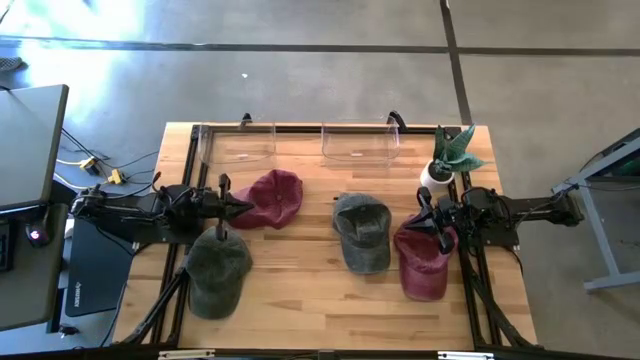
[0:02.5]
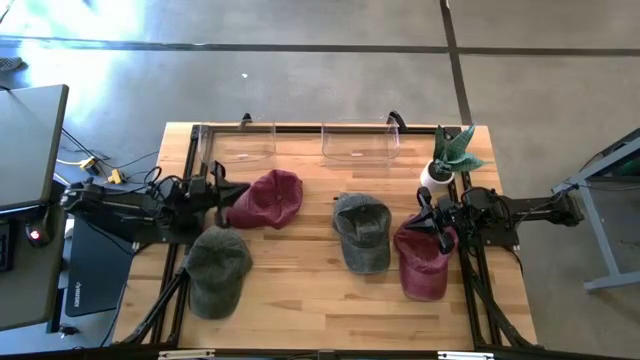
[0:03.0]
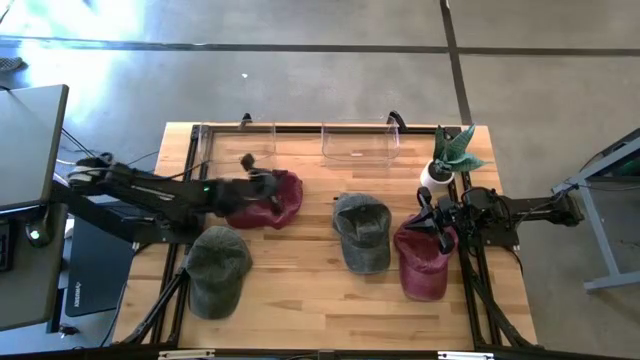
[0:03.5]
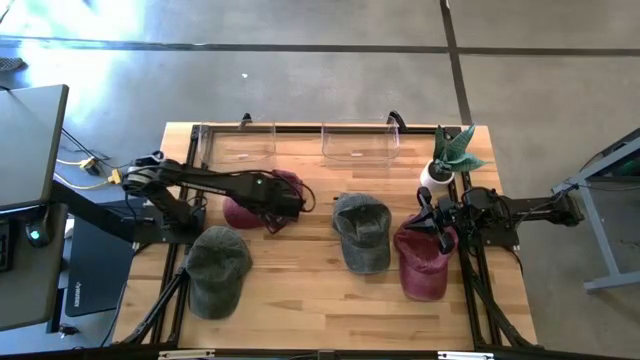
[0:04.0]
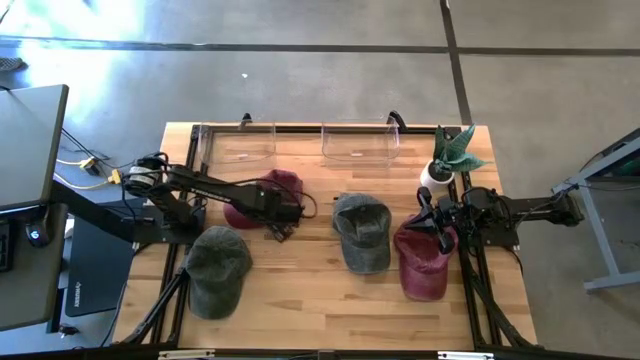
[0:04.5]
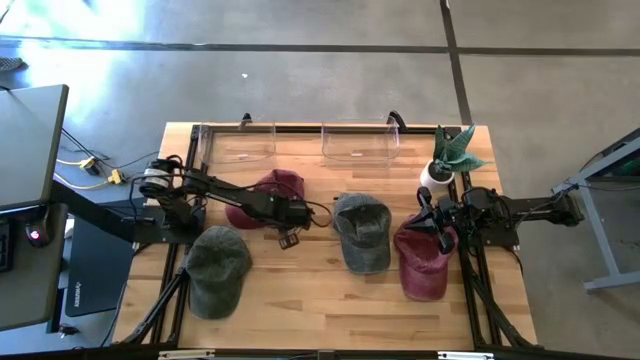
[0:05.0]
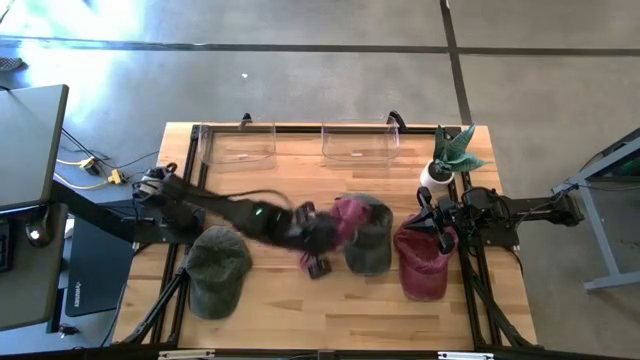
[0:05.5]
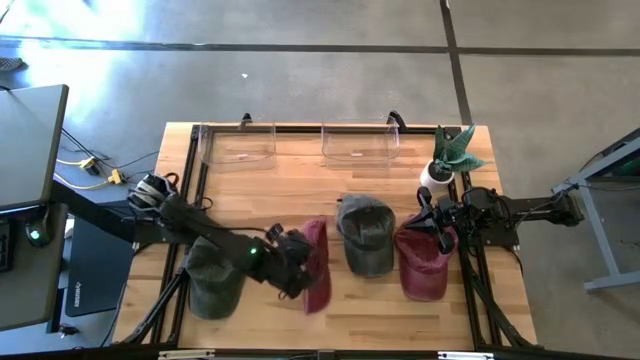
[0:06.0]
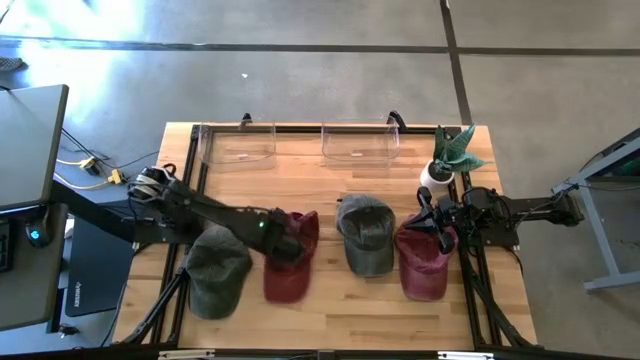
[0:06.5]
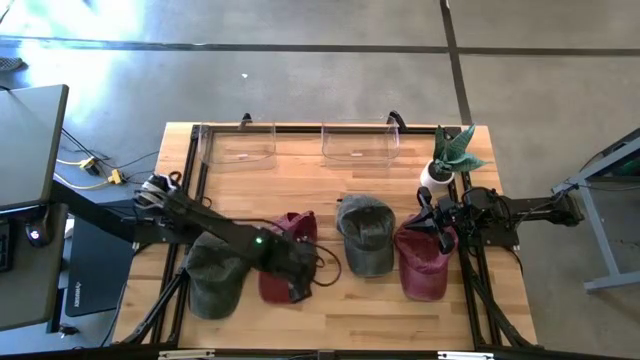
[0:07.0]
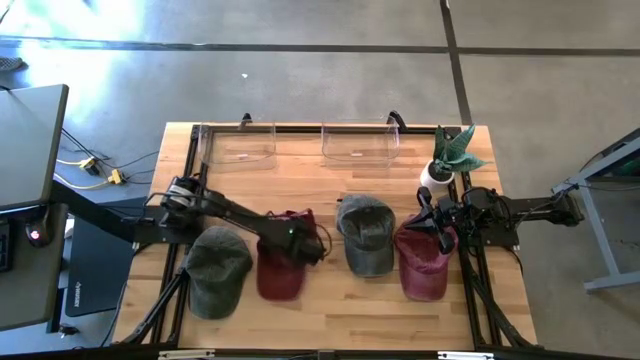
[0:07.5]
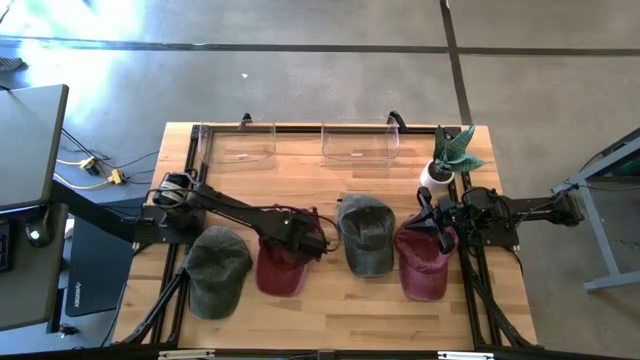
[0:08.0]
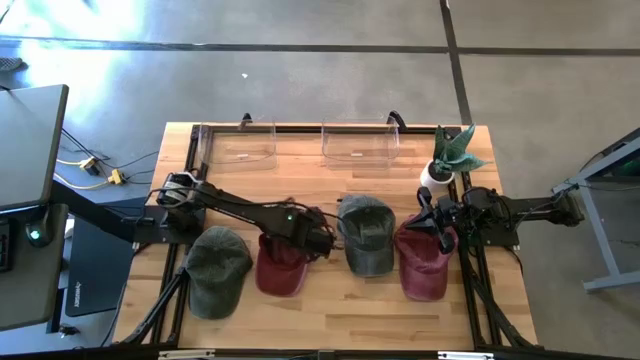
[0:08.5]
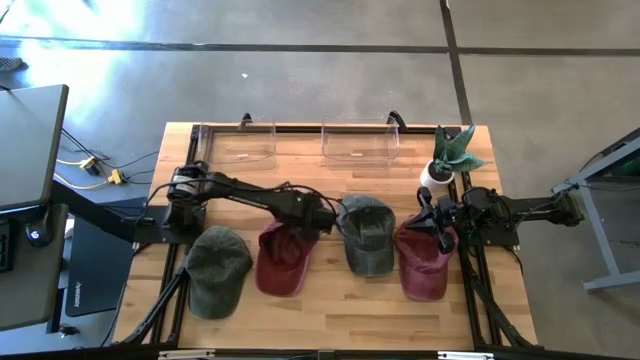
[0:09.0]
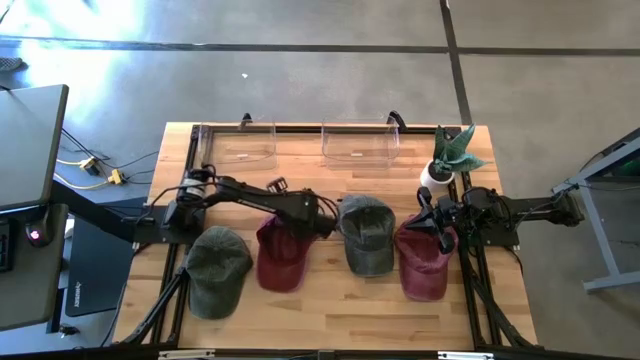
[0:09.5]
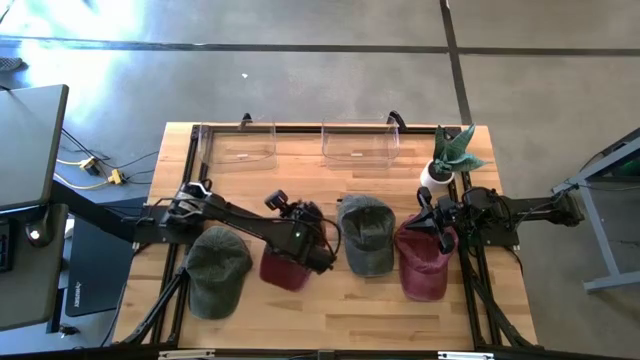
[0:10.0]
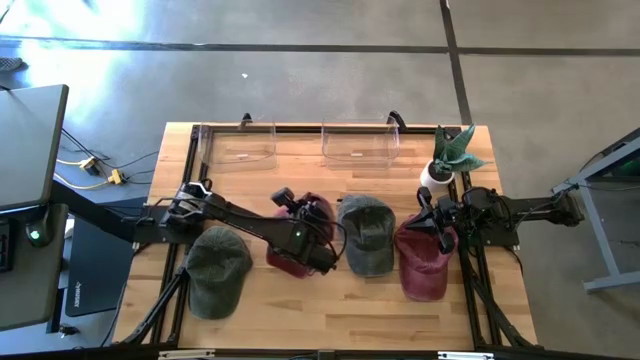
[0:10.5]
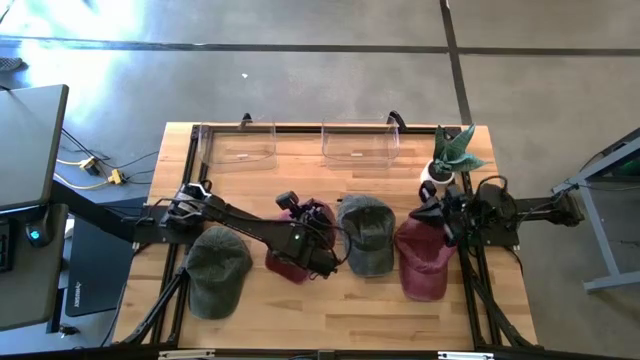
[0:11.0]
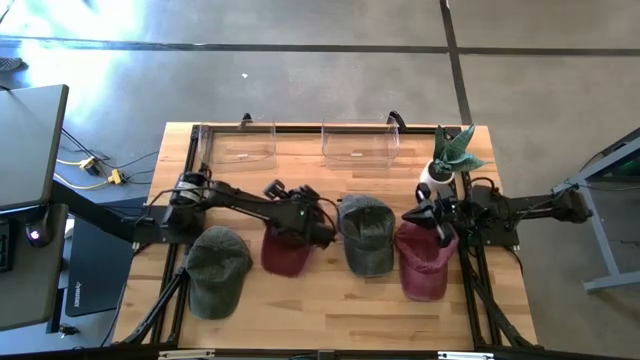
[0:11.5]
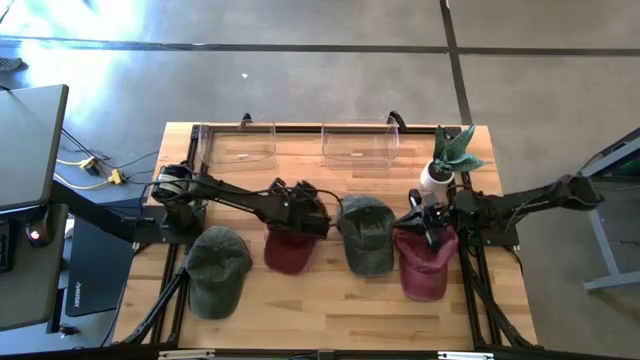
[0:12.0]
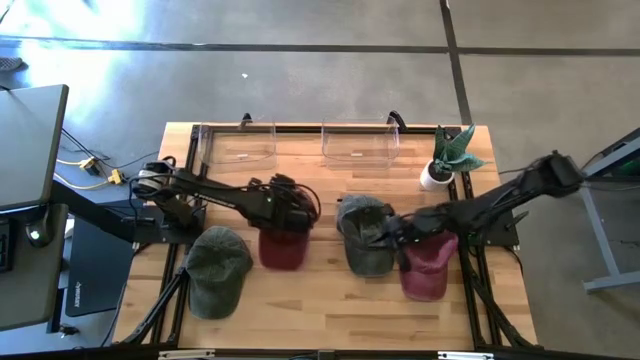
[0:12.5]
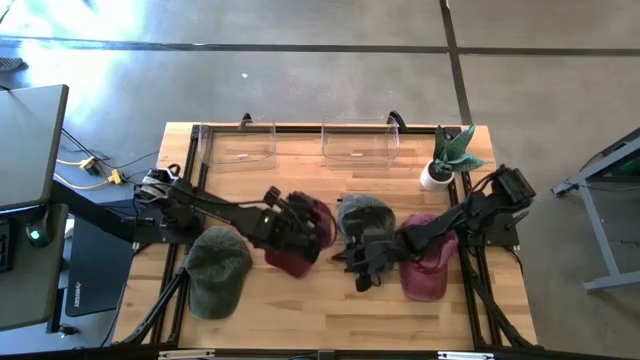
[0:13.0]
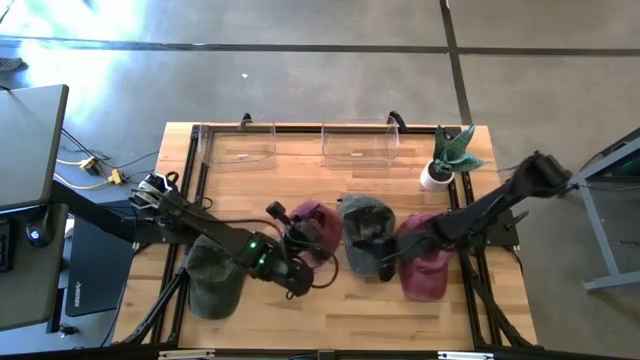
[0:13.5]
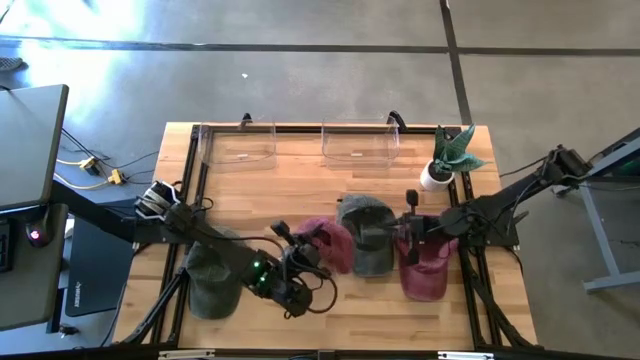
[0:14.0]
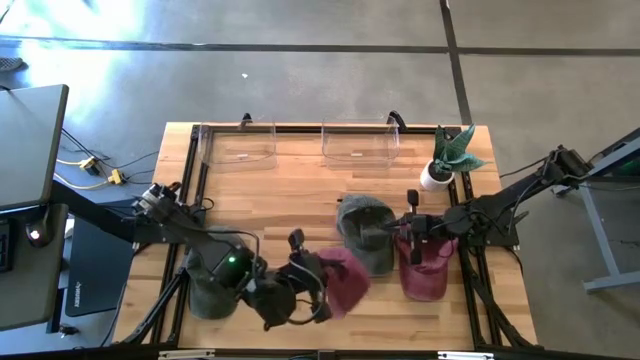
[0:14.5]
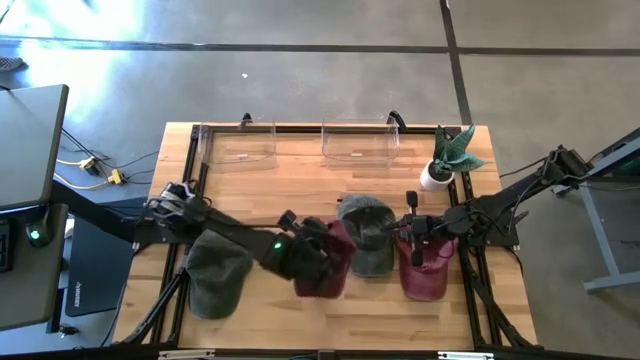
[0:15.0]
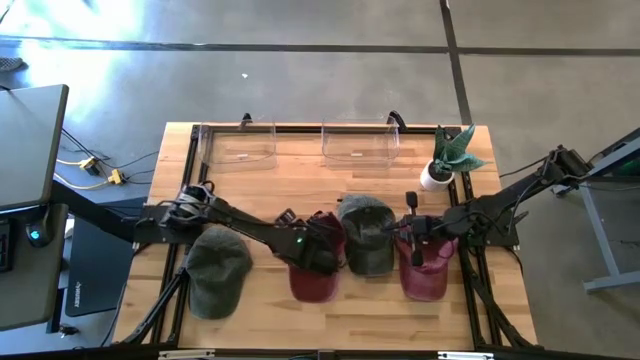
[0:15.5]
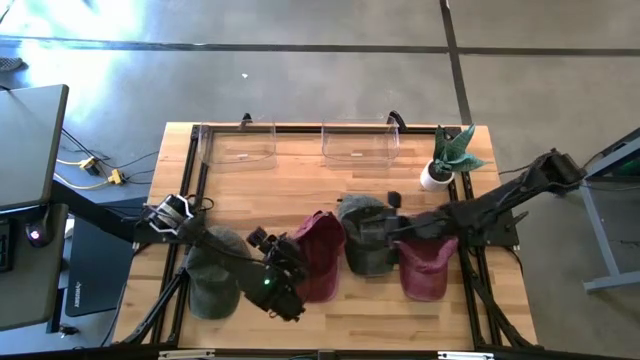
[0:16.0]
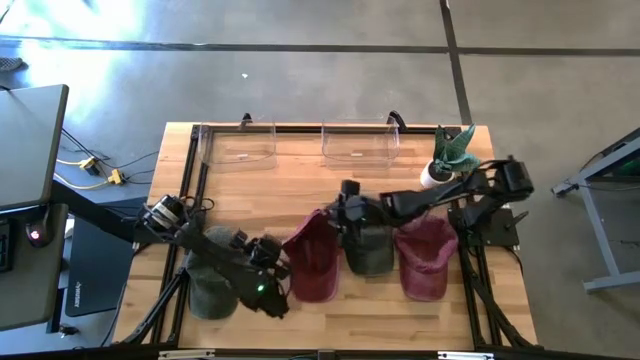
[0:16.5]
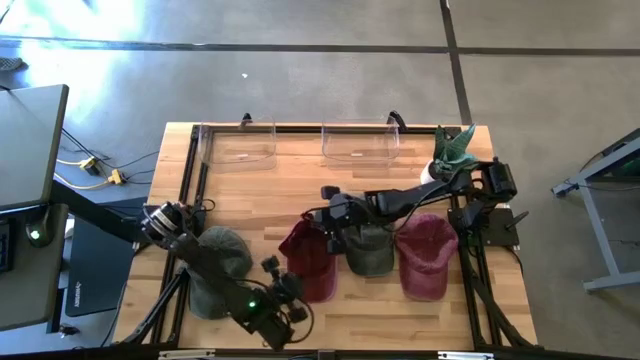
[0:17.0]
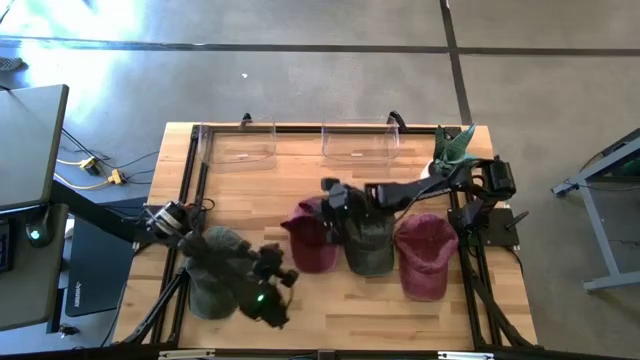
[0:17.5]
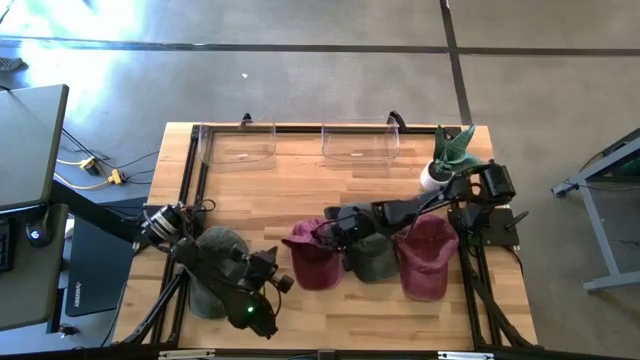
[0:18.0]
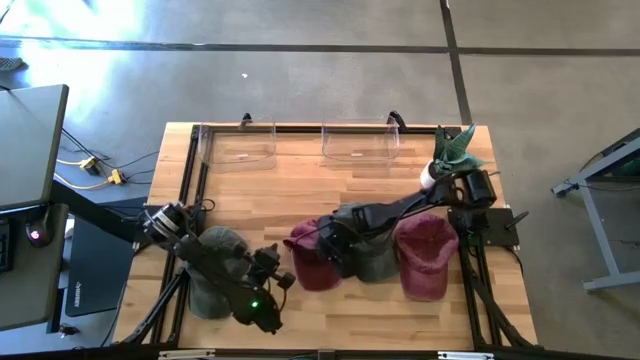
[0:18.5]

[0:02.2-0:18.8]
Task: Pick & Place hat
Put the left red cap into the right transparent bin
